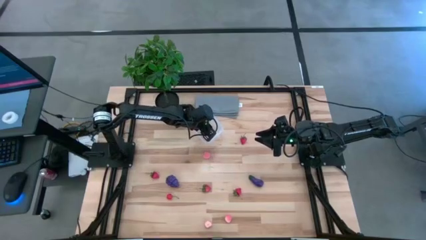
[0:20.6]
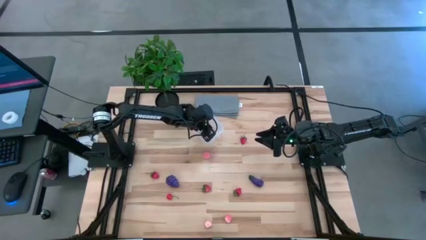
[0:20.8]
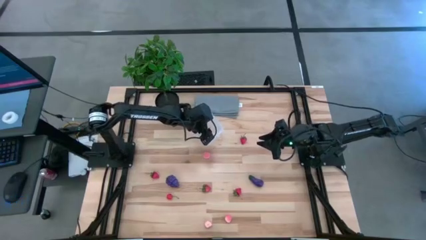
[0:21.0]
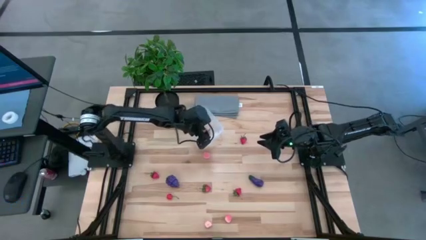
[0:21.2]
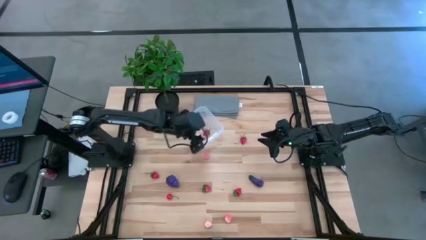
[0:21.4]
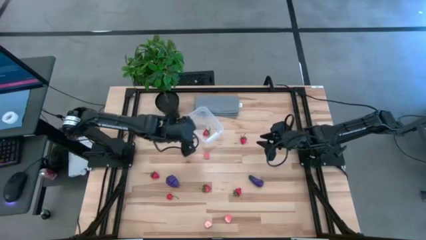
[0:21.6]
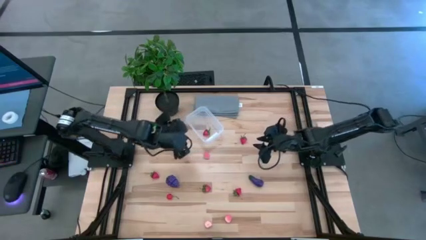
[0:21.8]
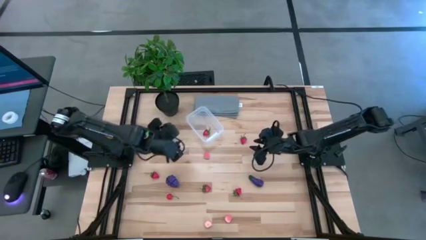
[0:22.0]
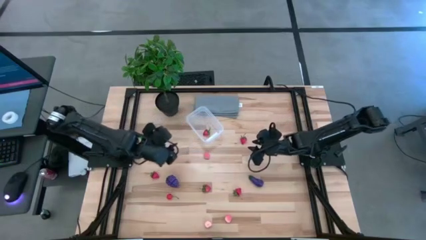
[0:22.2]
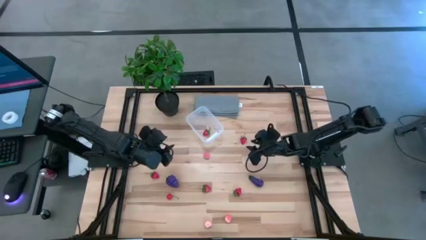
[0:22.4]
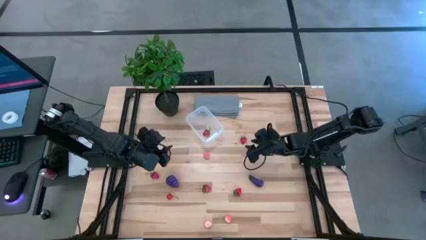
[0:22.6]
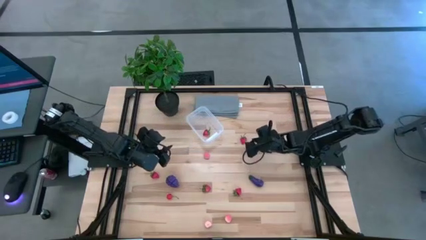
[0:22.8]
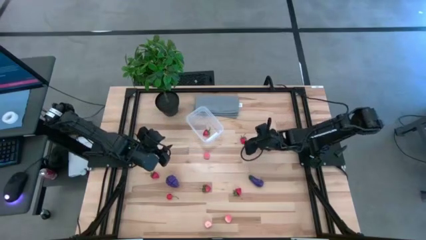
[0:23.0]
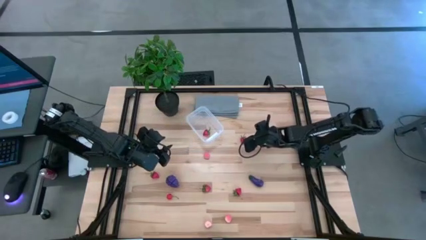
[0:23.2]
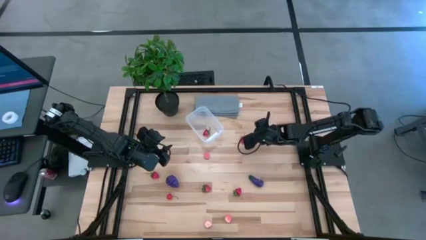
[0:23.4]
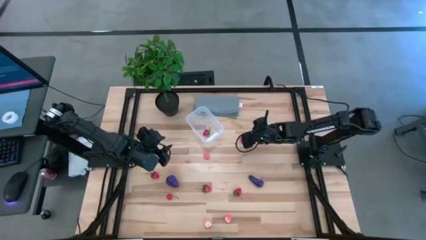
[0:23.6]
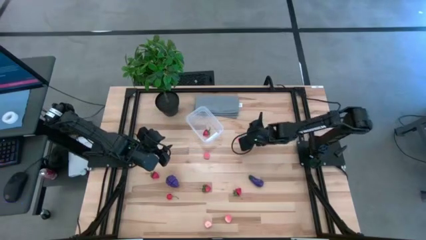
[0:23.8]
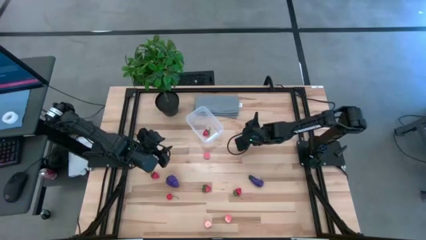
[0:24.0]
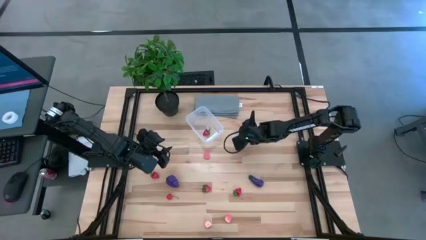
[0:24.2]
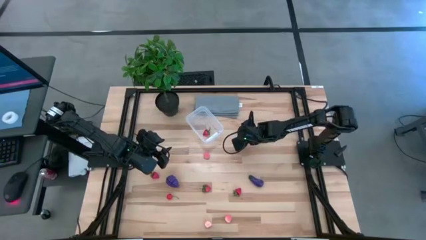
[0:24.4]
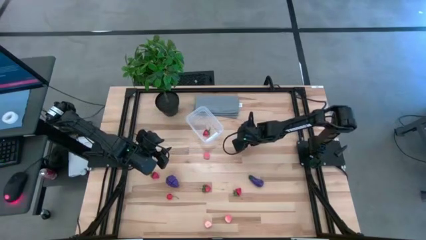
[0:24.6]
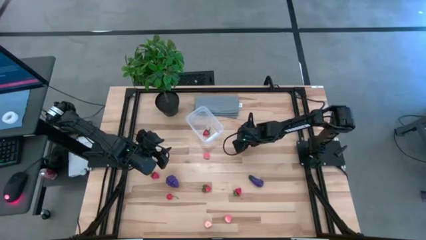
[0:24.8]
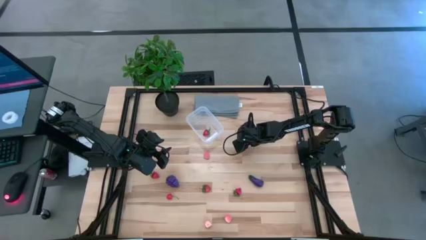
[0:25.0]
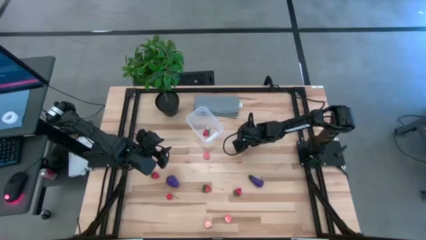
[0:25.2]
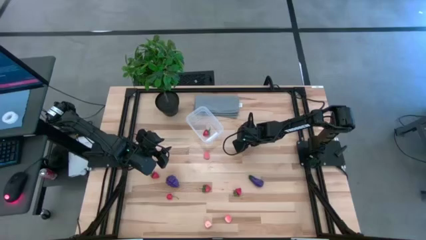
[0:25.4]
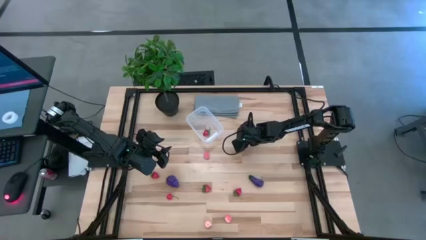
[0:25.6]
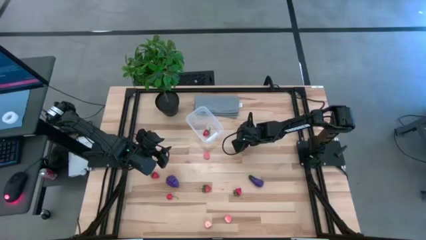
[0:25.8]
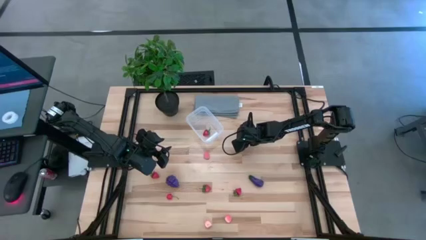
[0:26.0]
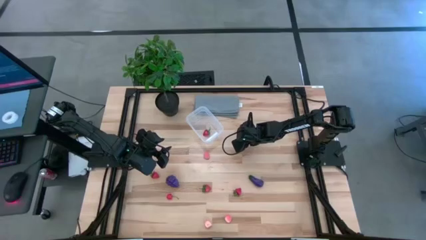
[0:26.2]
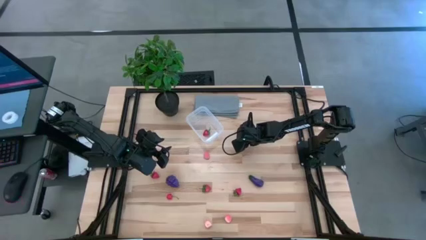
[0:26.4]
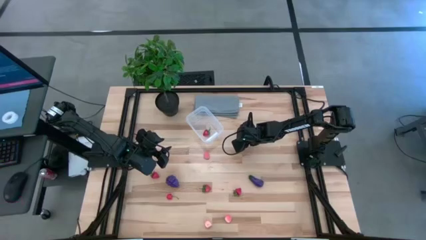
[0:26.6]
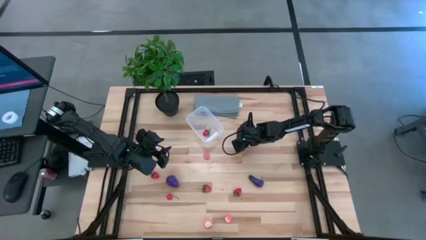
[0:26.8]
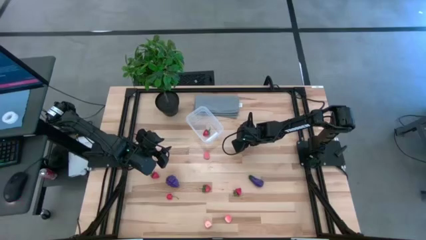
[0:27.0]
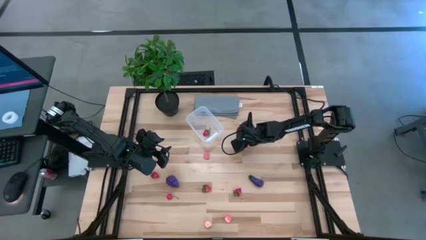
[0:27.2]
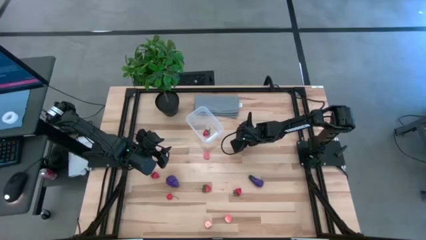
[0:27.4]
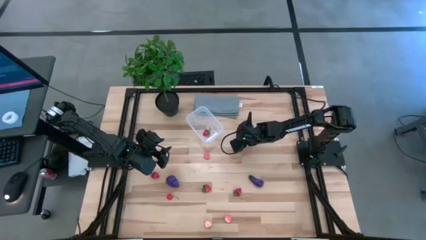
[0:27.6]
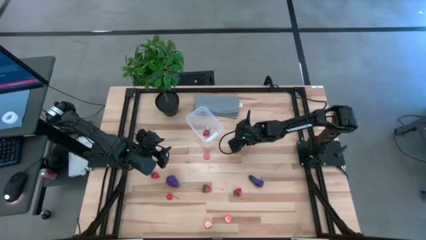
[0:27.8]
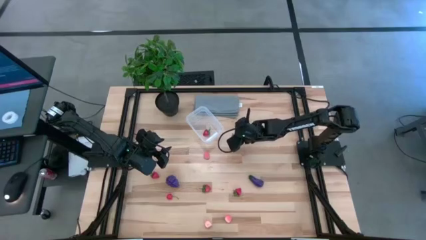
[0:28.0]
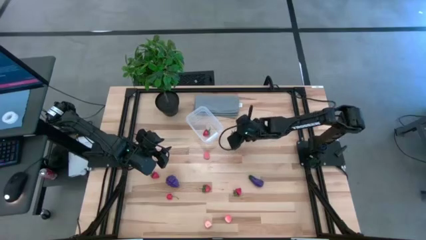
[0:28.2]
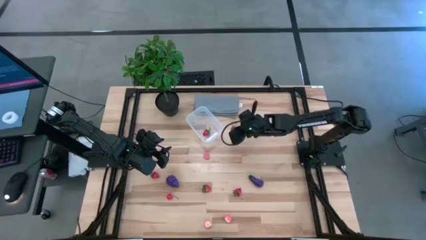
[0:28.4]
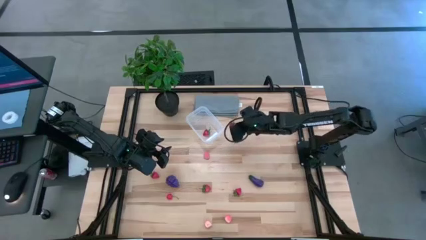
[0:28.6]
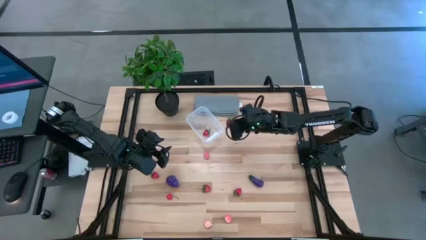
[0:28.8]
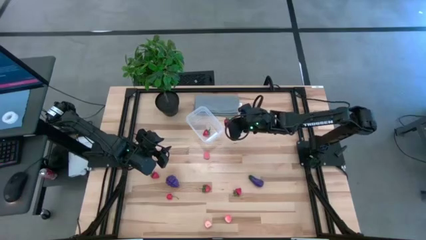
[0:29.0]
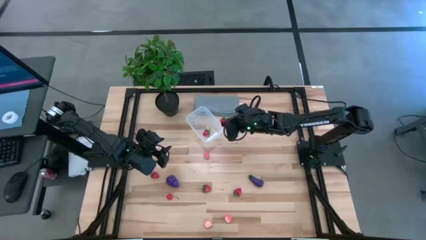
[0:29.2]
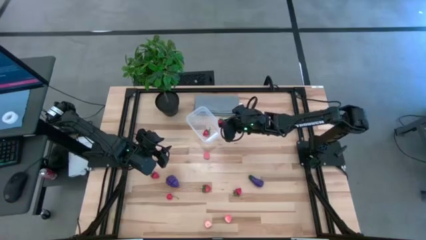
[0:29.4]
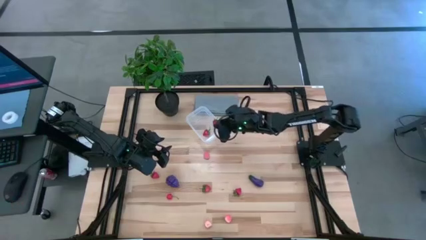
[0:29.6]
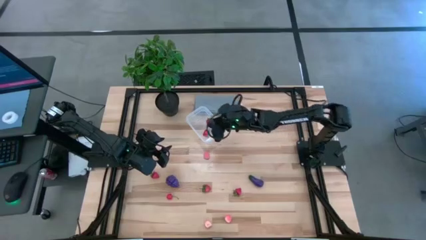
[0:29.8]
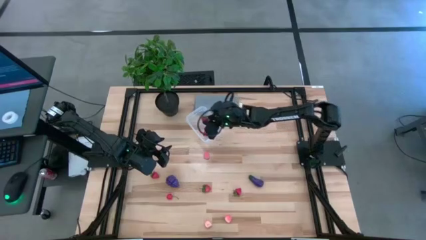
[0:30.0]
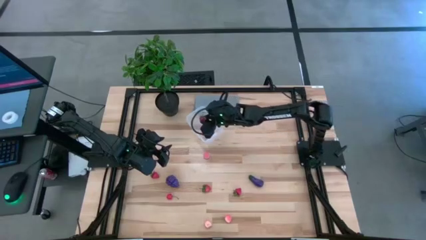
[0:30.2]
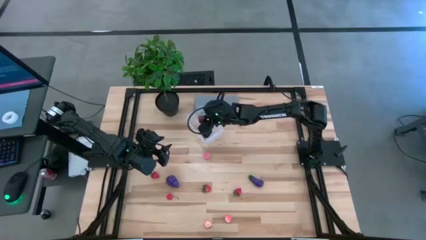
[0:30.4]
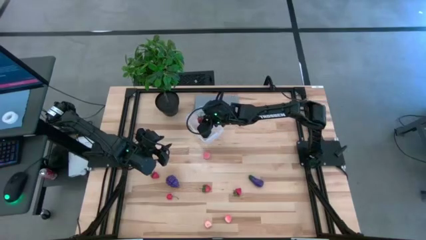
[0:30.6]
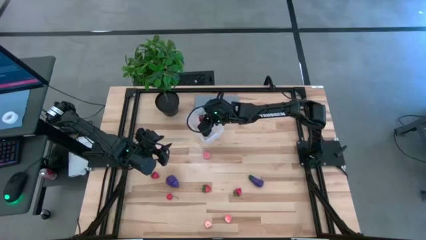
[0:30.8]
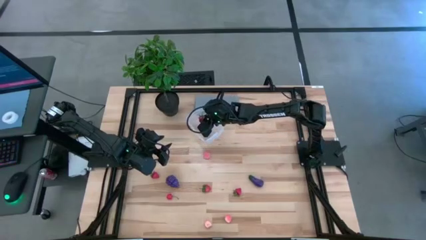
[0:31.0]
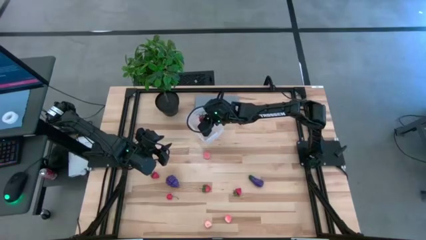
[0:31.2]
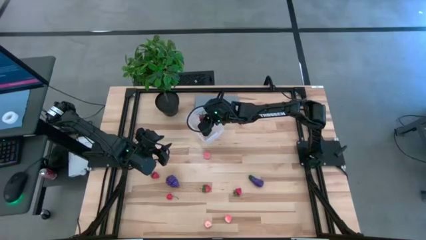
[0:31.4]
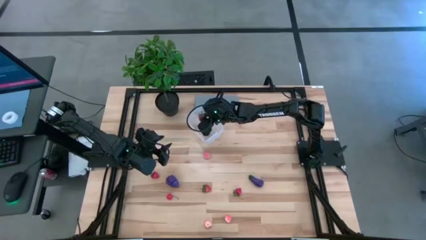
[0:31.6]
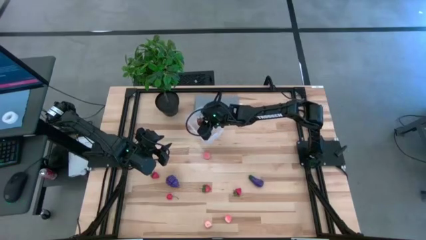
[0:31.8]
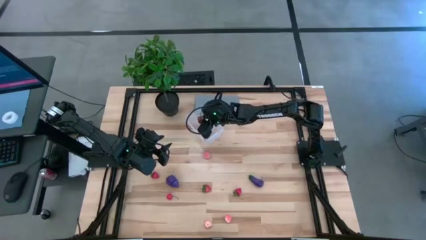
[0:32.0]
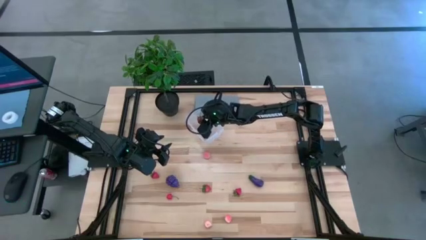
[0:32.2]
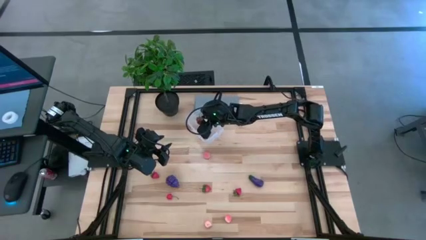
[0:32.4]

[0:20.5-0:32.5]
Task: Pick and placing Produce into tupperware
Put the red strawberry into the transparent bin
